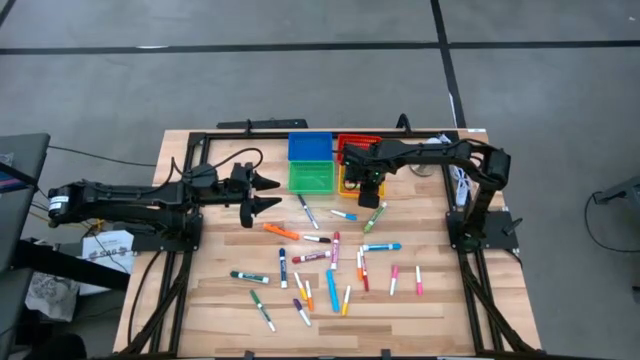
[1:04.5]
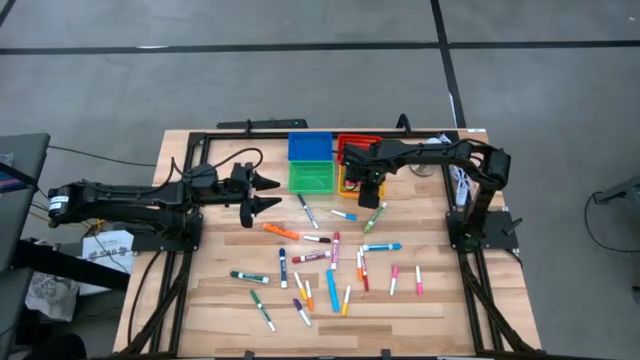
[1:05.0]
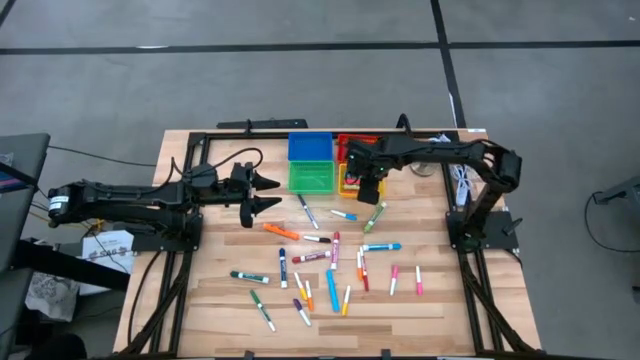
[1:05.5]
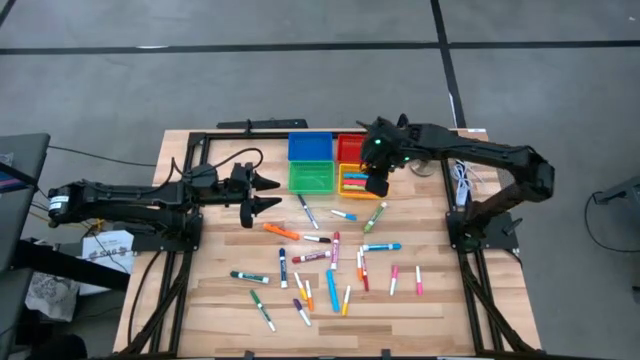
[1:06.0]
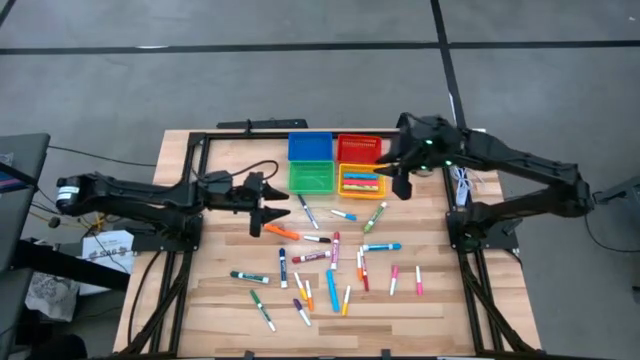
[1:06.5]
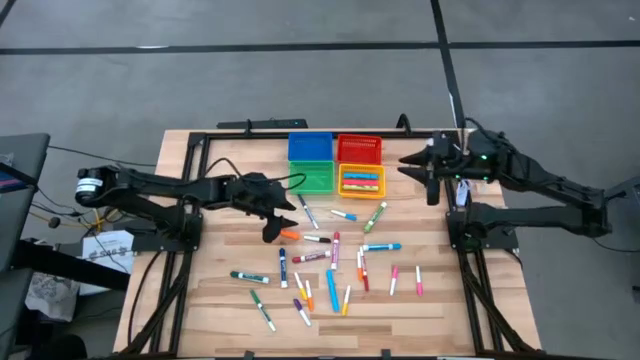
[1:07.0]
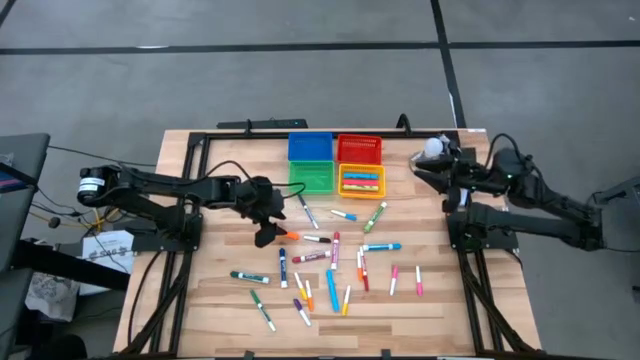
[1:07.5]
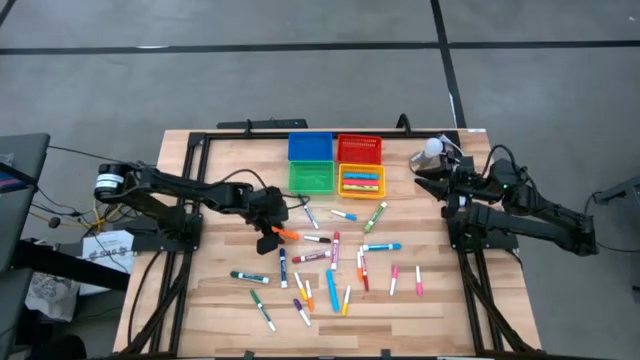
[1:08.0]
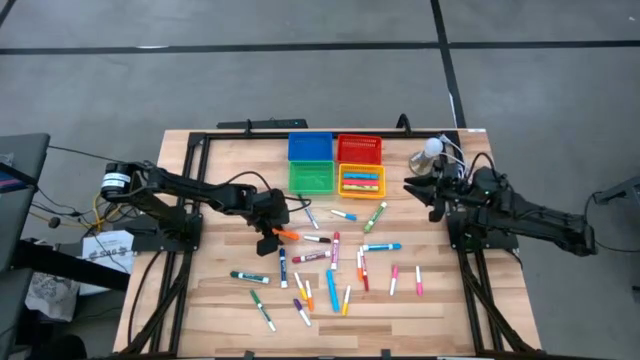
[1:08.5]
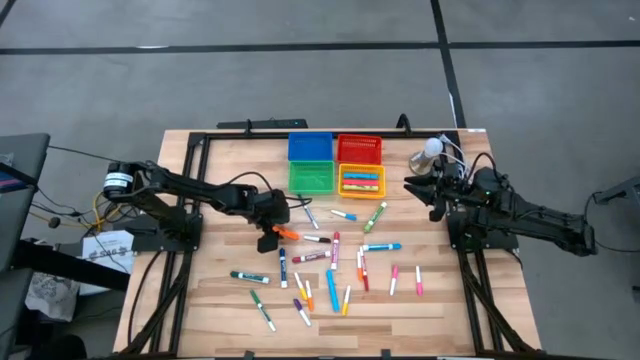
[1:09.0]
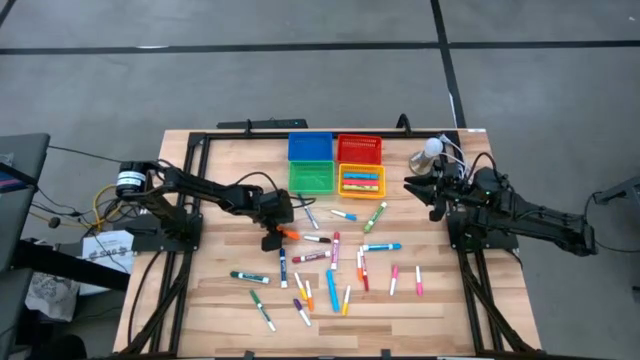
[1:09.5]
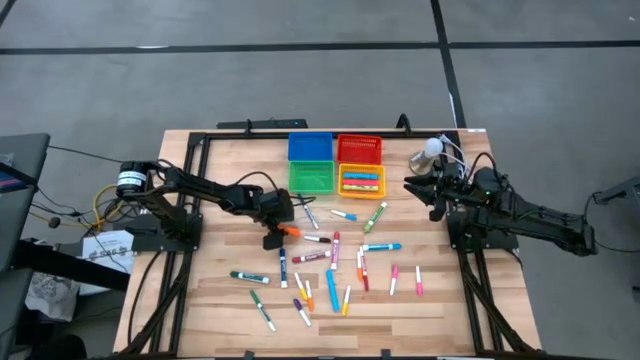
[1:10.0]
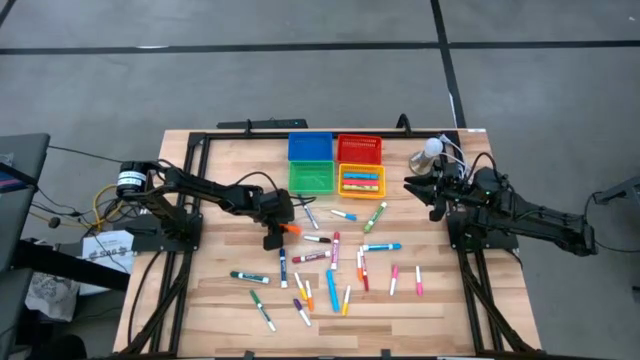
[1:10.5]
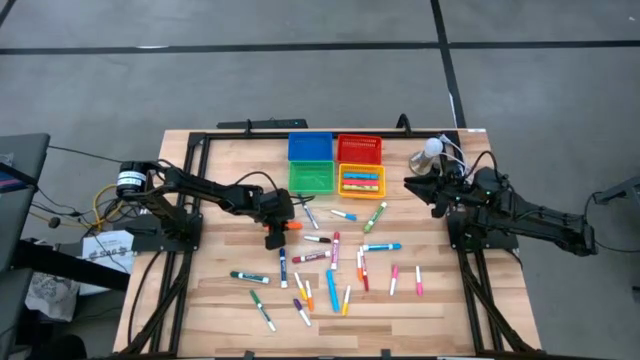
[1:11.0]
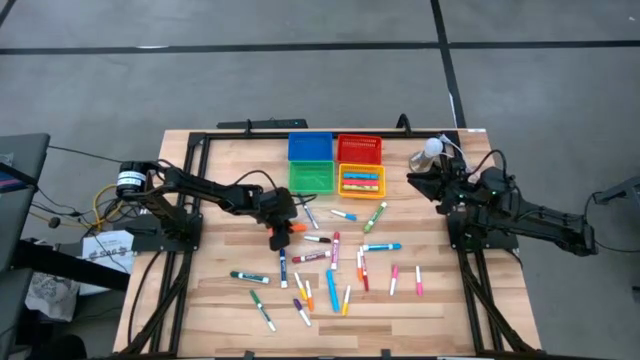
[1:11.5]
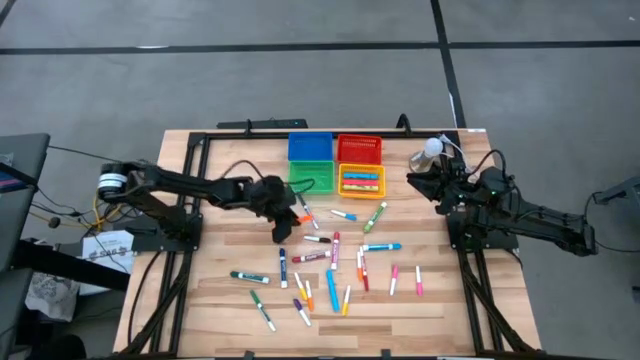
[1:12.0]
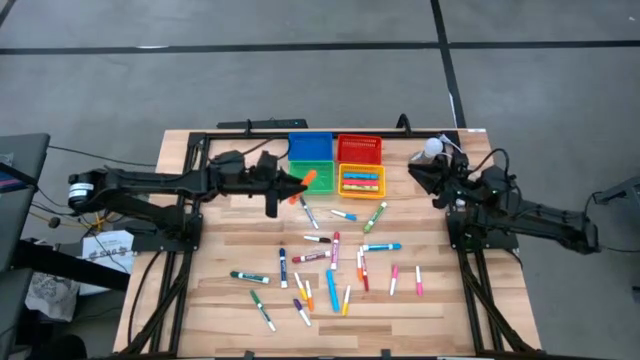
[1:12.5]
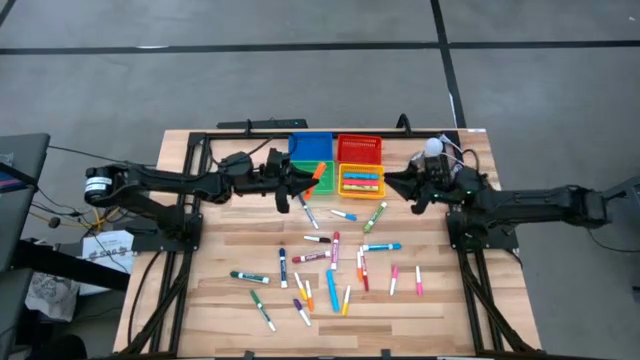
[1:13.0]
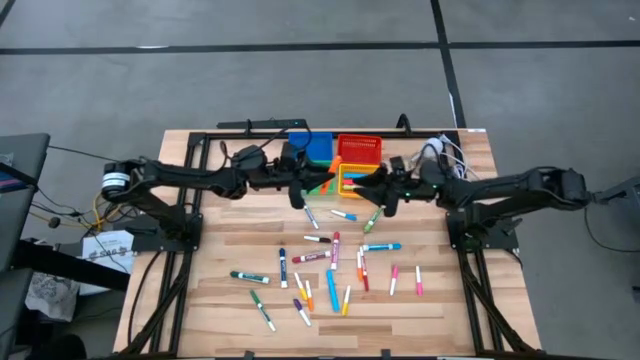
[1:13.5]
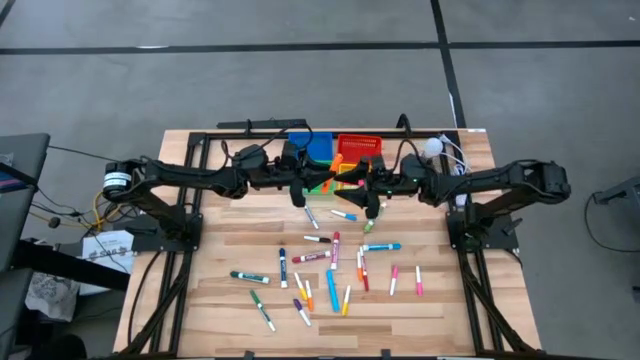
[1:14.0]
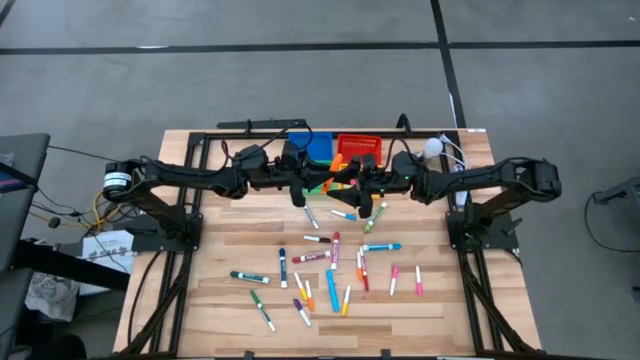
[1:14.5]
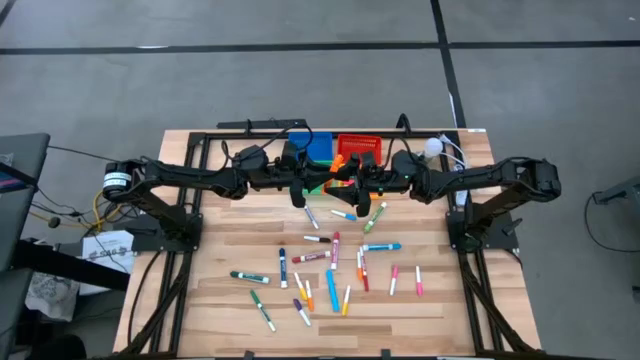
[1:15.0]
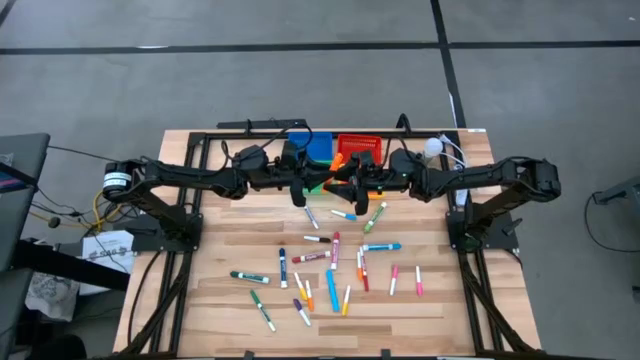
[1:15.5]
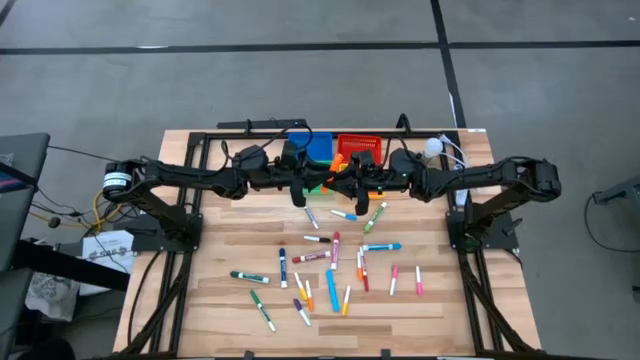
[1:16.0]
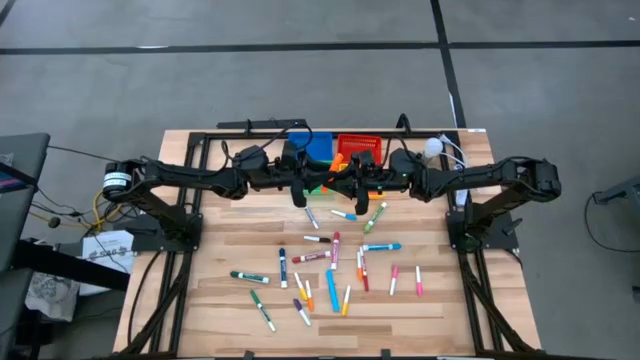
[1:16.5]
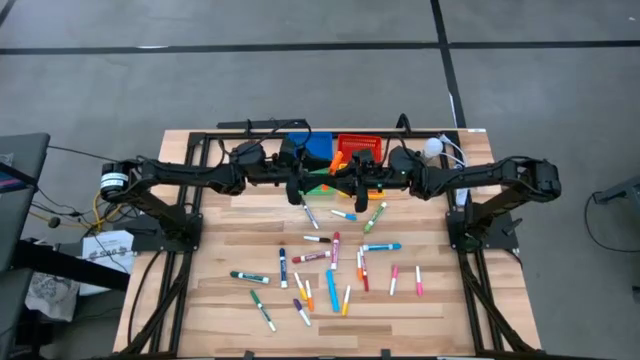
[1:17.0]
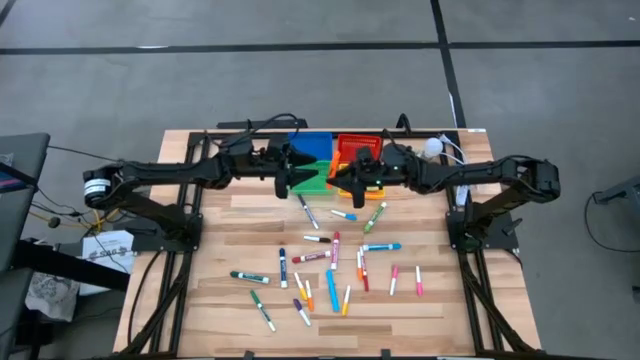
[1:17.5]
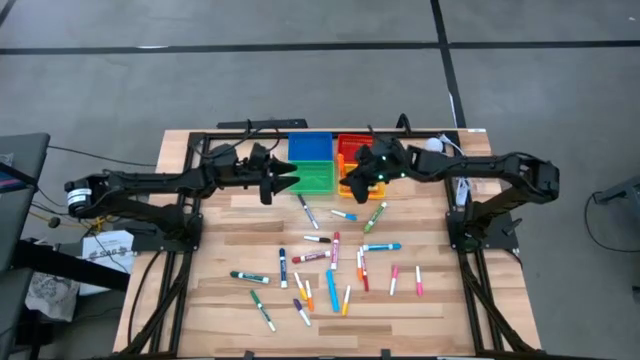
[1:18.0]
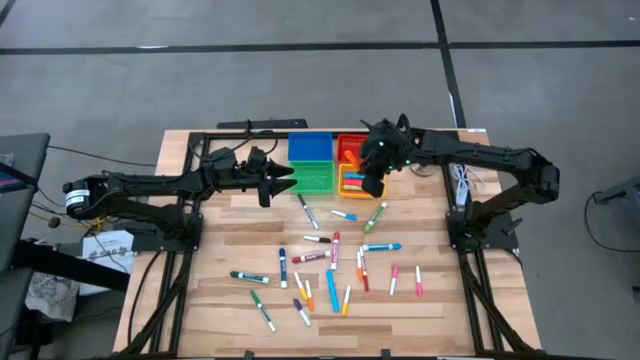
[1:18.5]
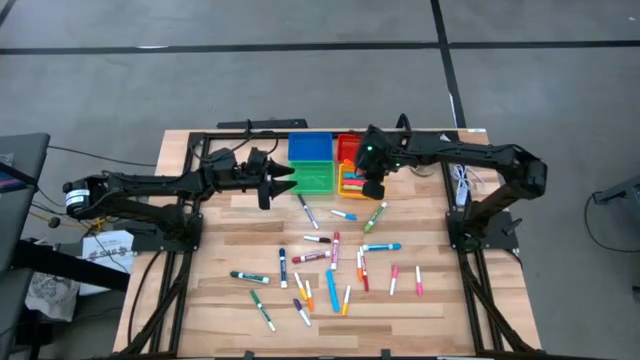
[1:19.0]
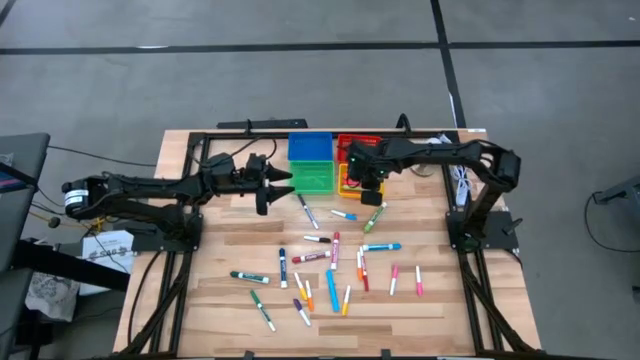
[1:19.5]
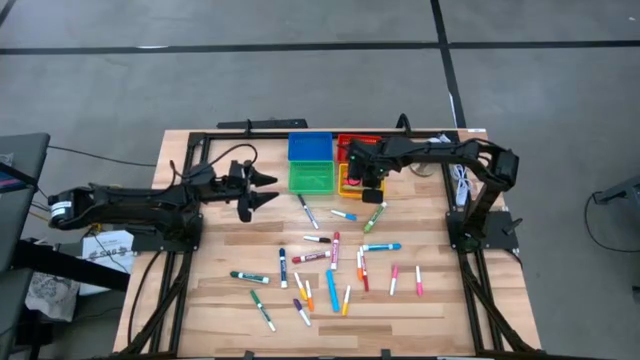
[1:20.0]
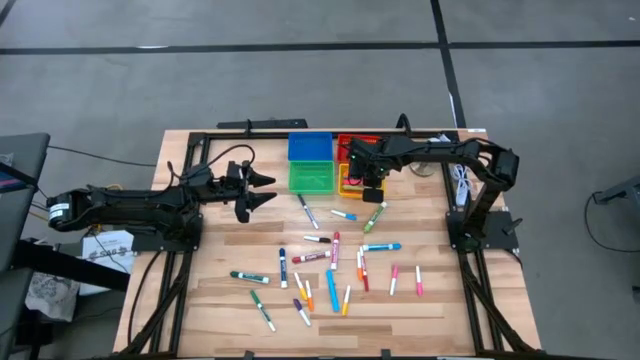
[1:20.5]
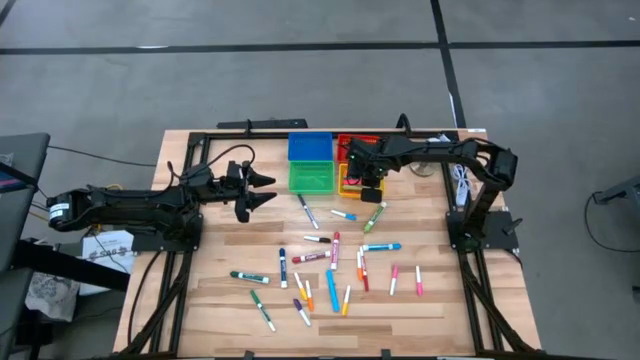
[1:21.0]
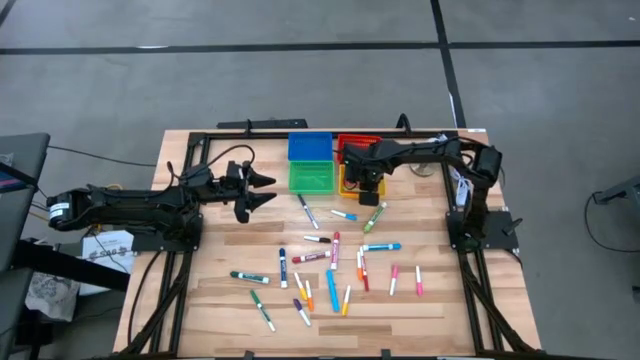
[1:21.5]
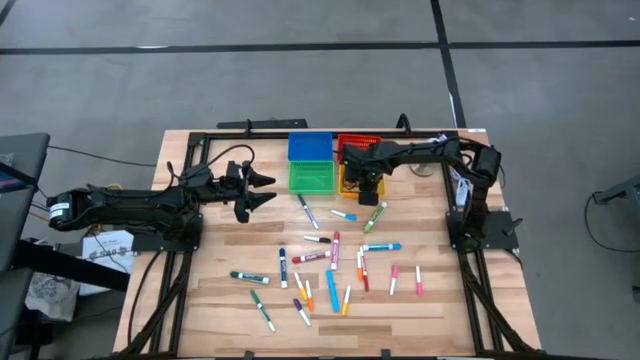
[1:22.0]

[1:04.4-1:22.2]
Task: Pick & Place Markers
Put the orange highlighter pen into the yellow bin

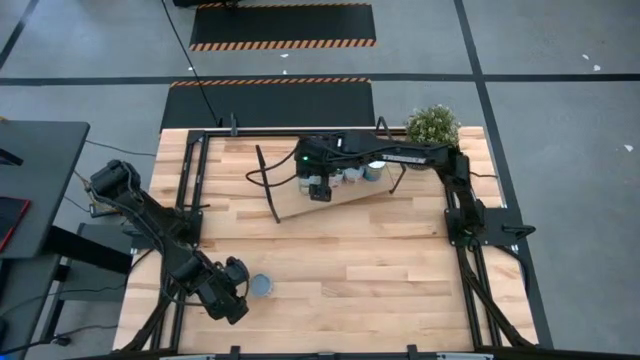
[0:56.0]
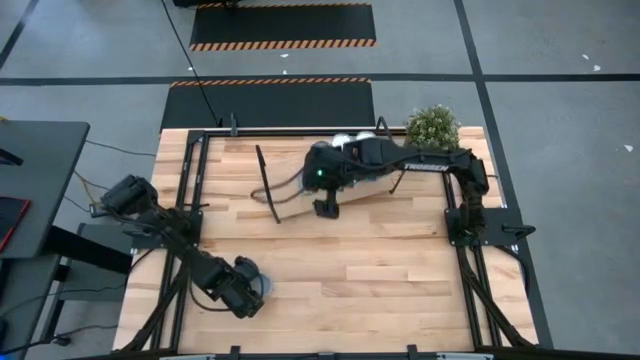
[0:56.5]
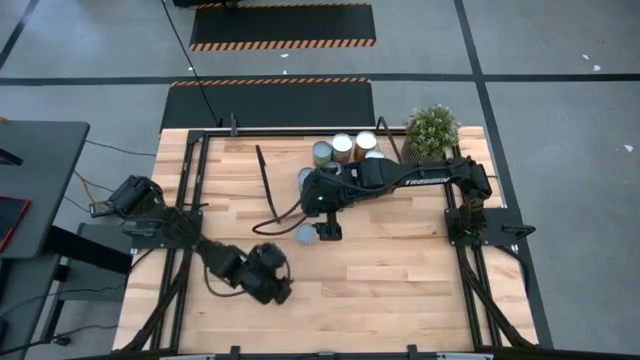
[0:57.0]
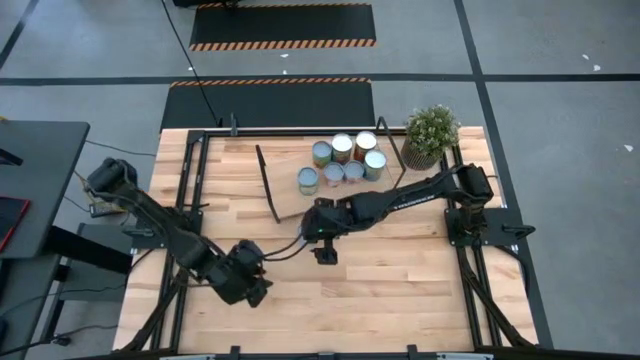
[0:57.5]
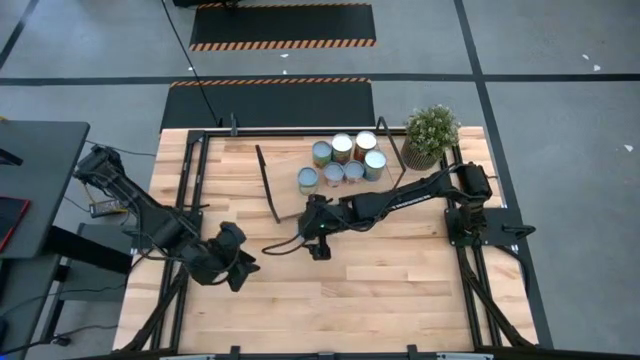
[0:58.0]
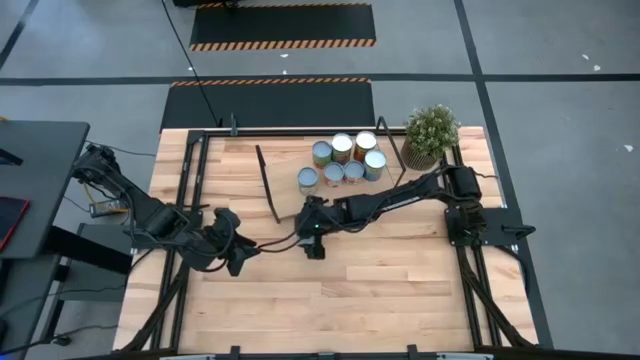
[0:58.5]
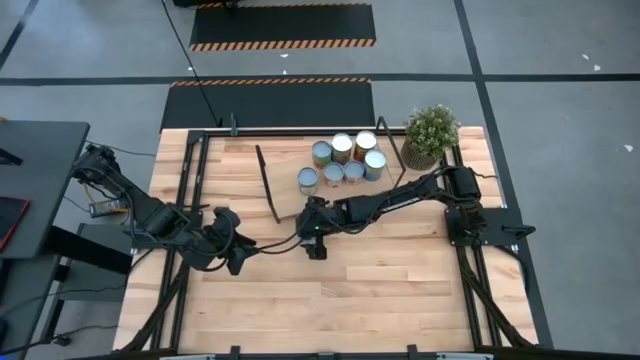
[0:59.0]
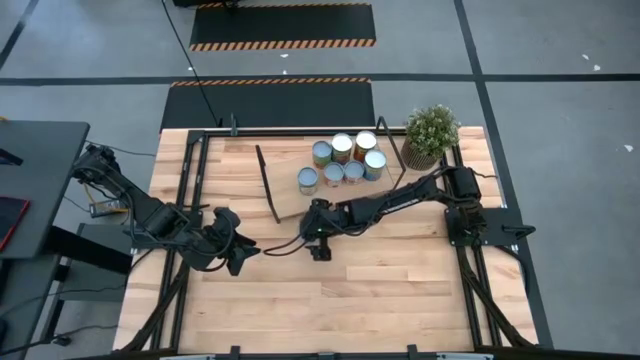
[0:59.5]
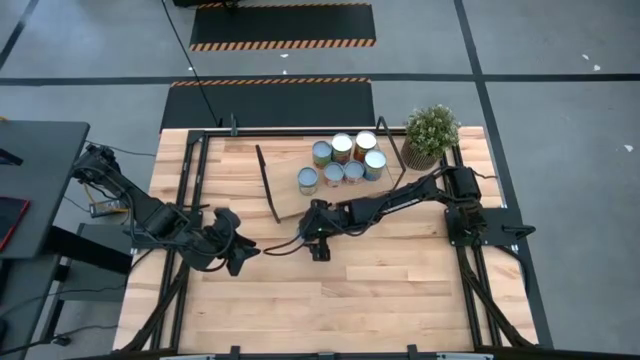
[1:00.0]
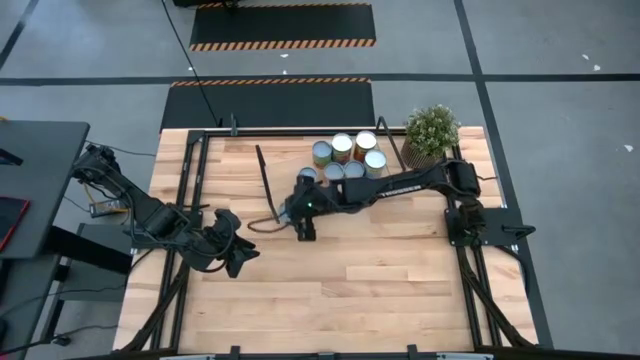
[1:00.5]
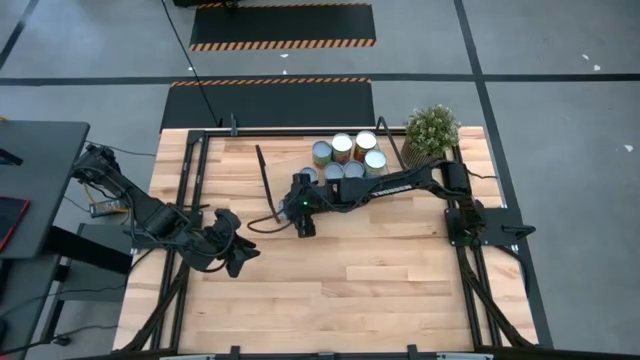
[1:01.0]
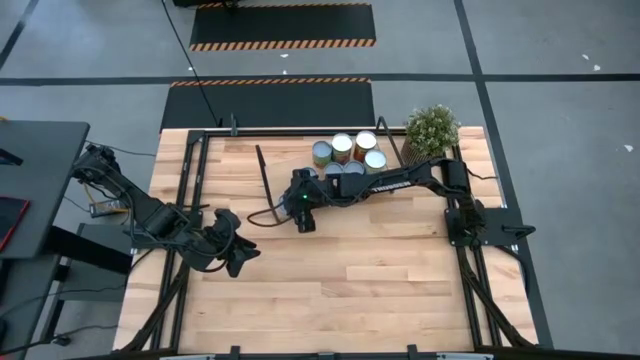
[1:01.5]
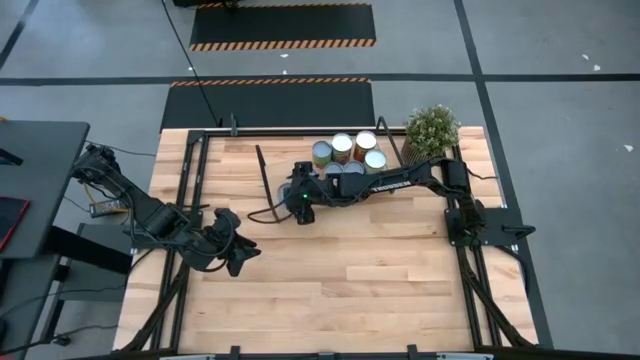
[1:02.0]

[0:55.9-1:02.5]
Task: Pick and place cans onto a shelf
Put the canned orange on the shelf
